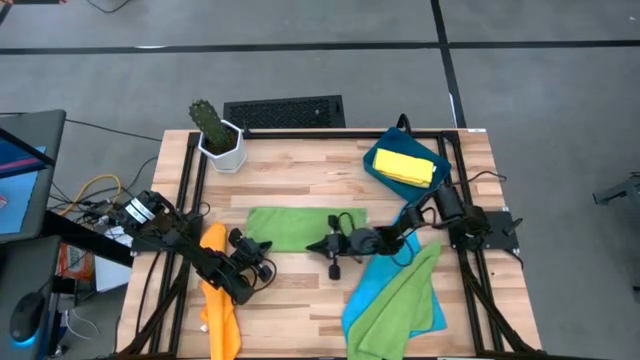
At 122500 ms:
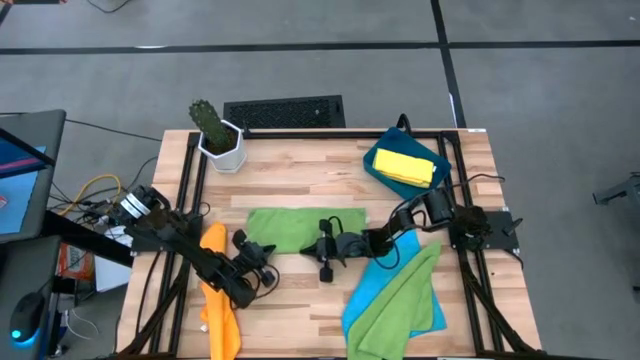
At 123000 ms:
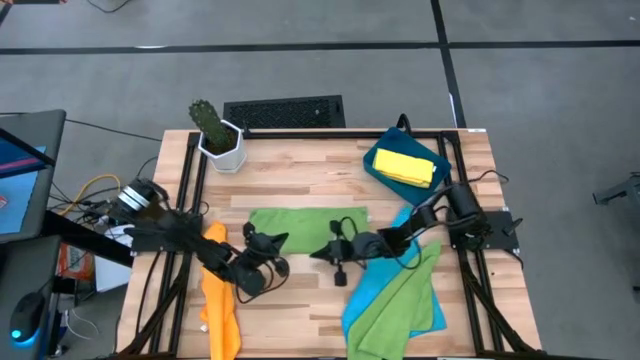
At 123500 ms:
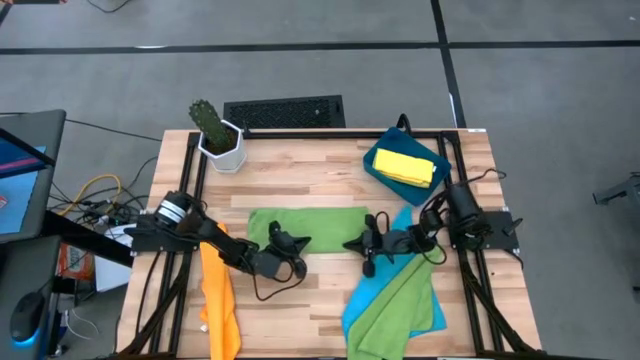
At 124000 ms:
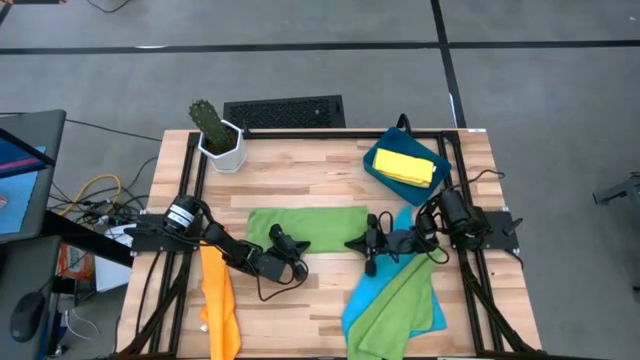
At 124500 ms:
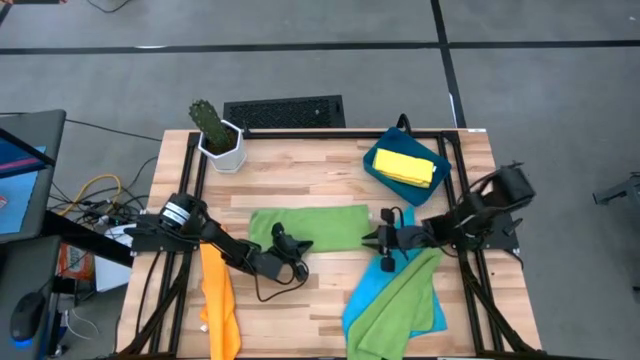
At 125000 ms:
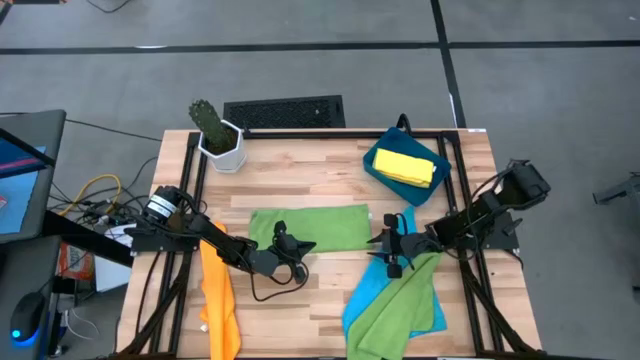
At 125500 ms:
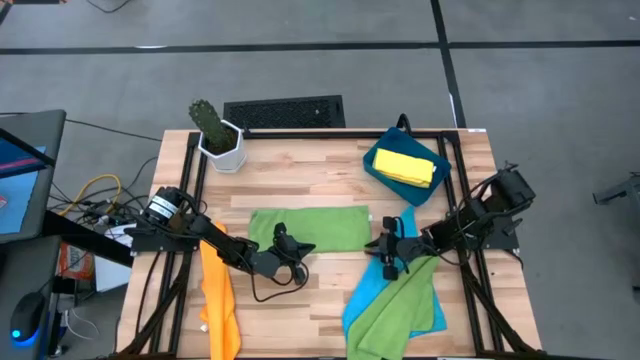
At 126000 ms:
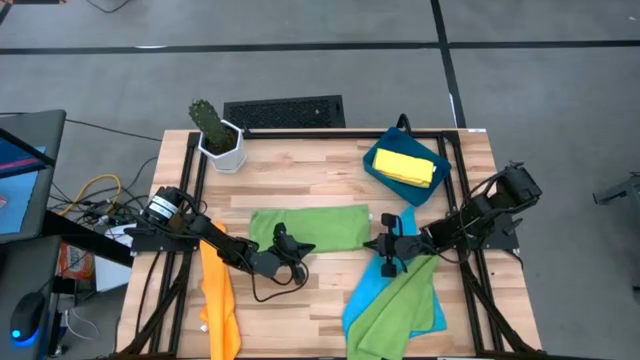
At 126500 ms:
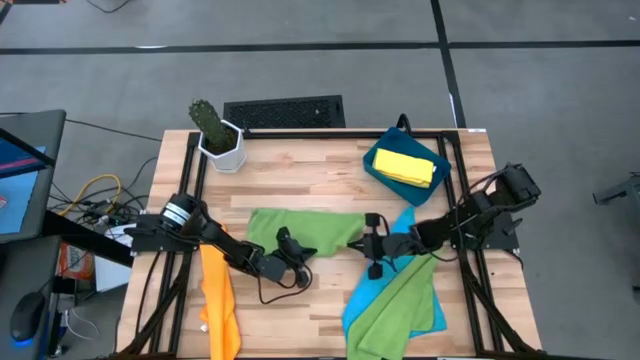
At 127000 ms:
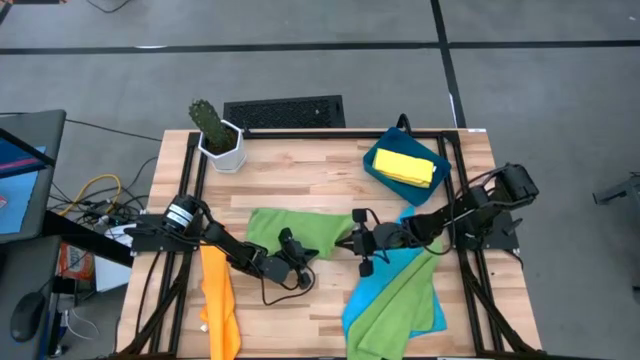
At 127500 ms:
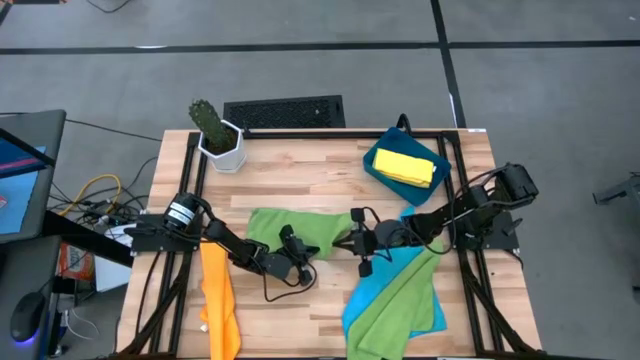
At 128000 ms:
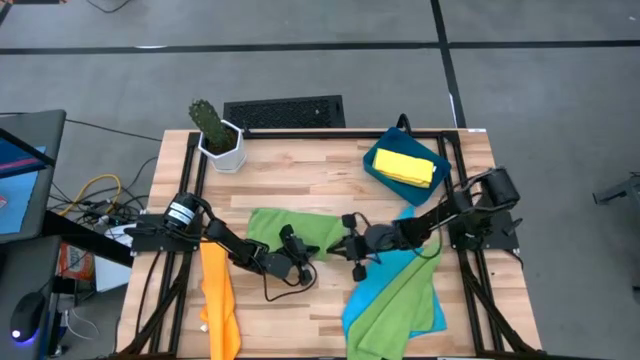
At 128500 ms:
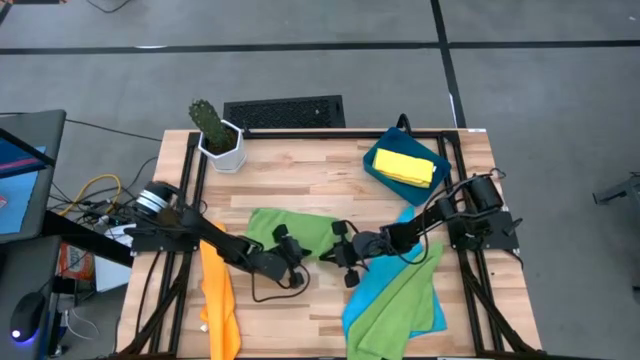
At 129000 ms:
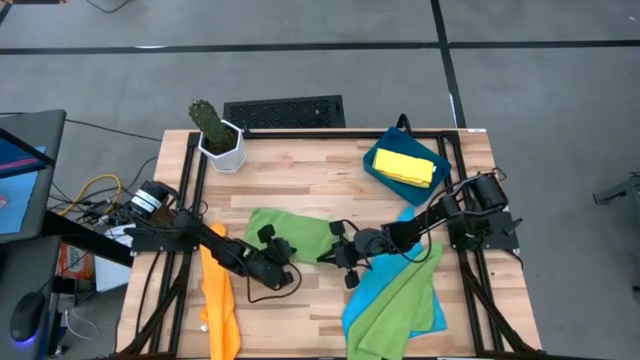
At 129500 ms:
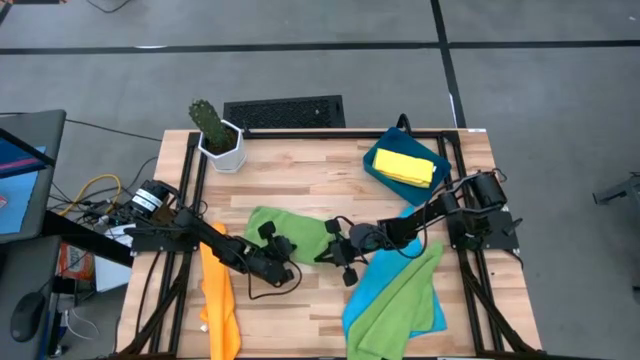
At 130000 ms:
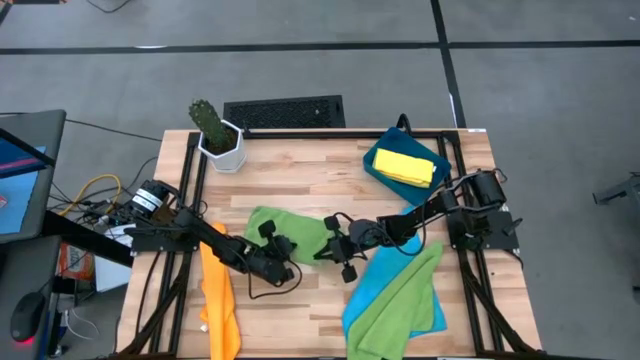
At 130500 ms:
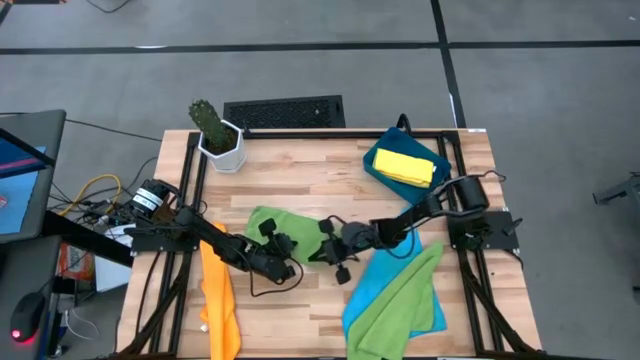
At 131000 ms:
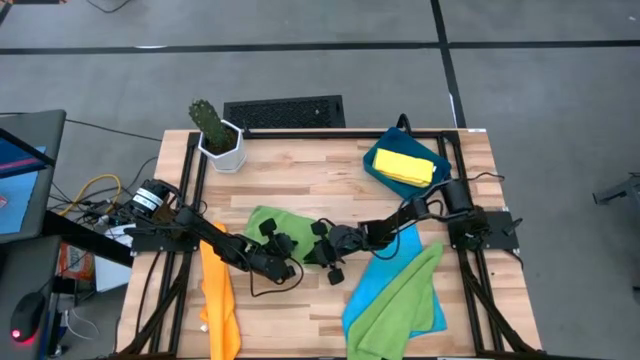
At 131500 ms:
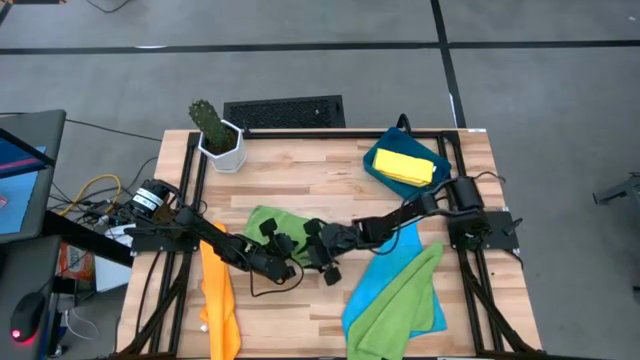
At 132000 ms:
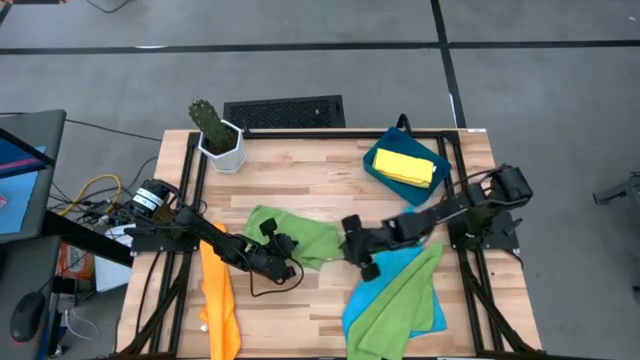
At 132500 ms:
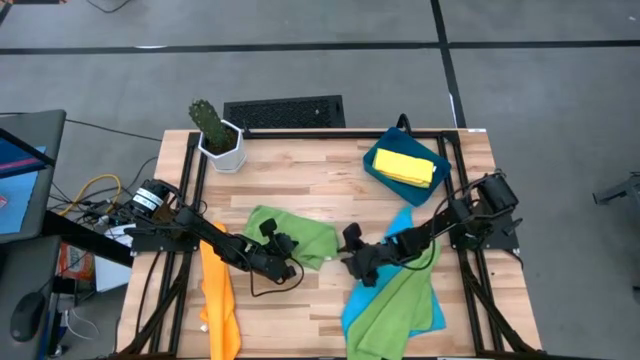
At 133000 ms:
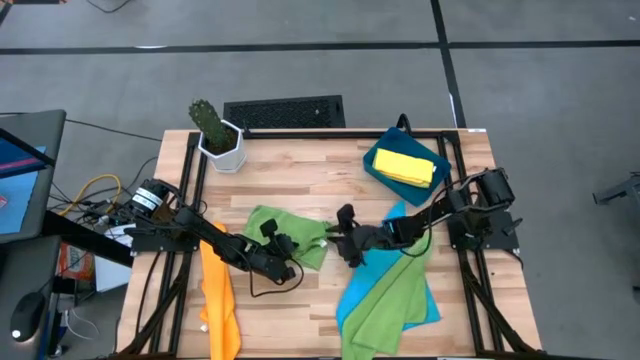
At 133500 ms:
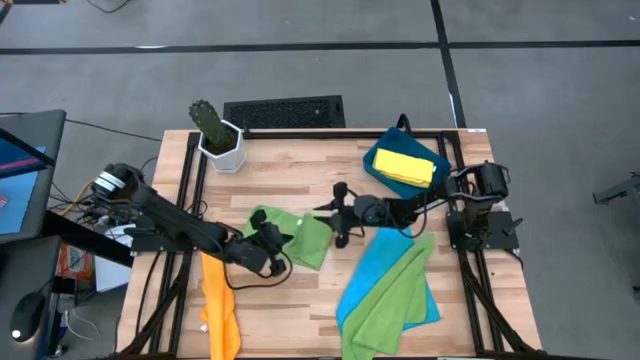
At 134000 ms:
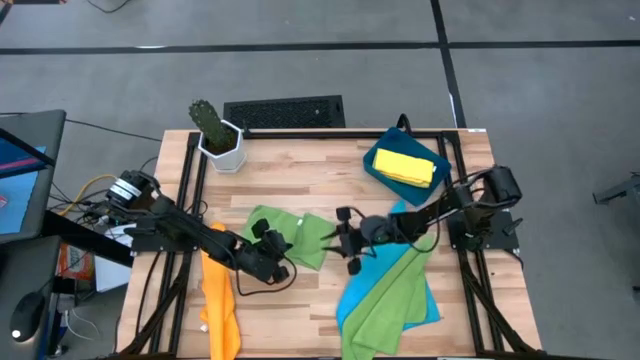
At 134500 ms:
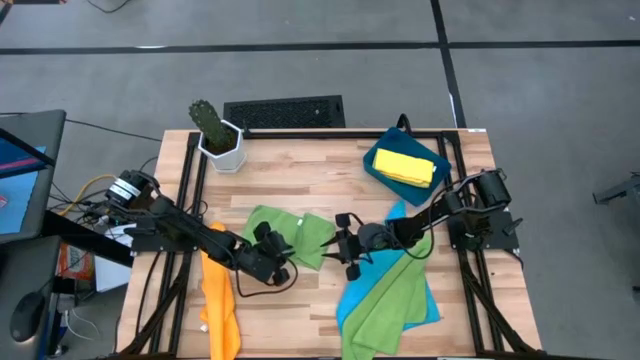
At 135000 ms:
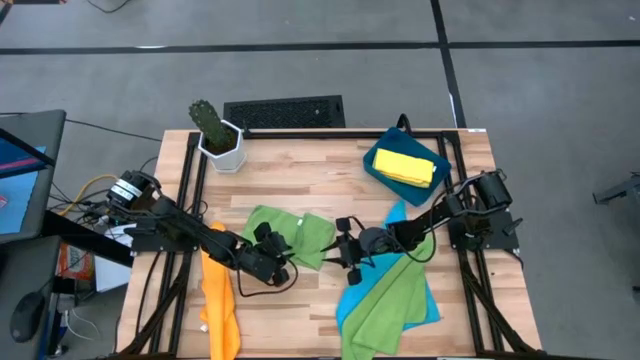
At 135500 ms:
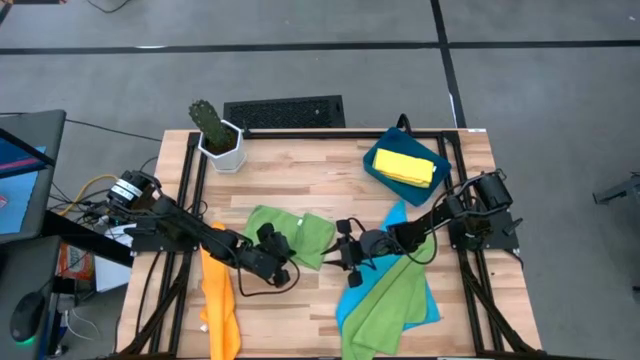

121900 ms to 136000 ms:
Task: Fold microfiber towels
Fold the left green microfiber cloth

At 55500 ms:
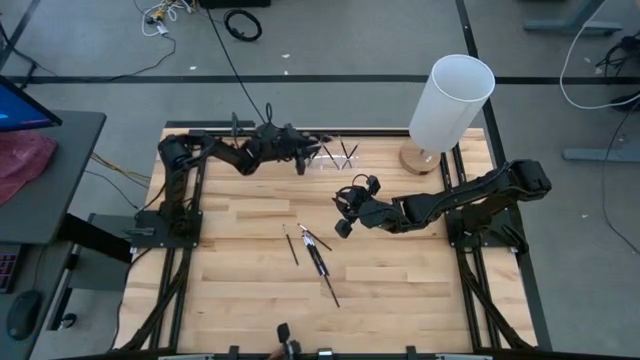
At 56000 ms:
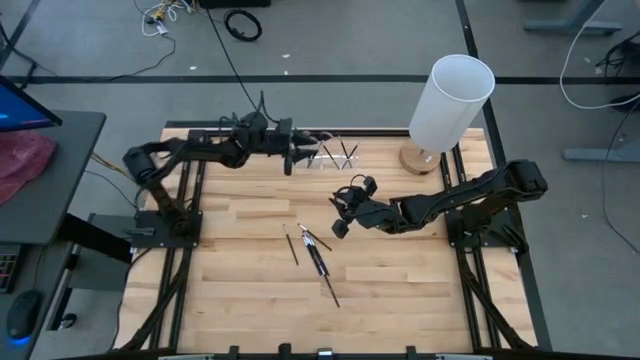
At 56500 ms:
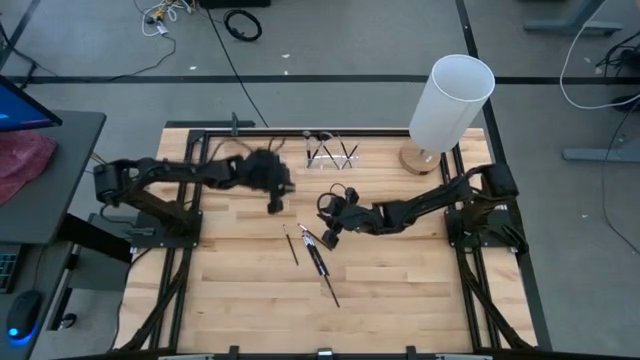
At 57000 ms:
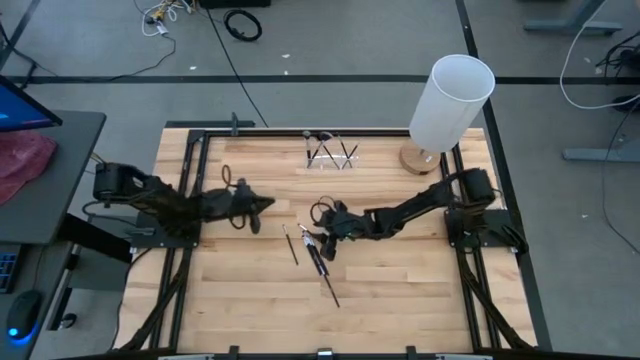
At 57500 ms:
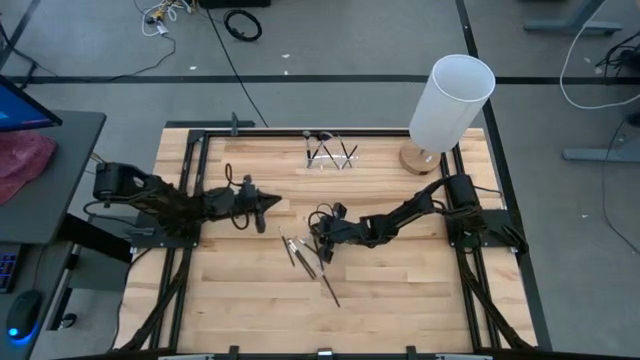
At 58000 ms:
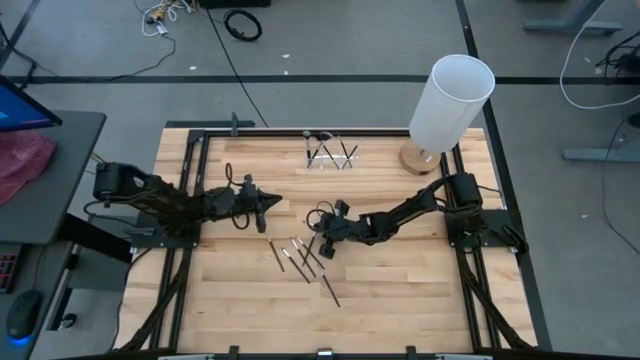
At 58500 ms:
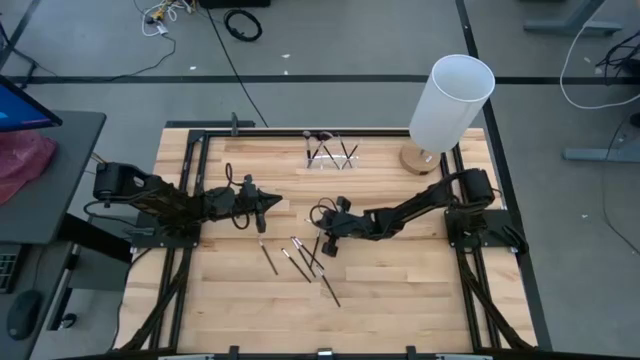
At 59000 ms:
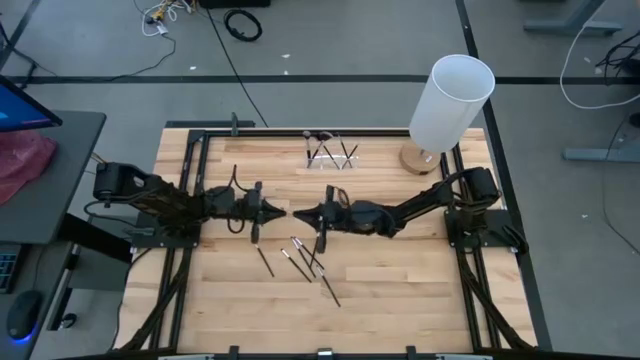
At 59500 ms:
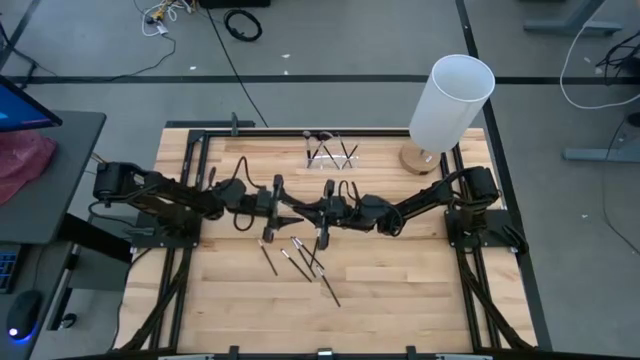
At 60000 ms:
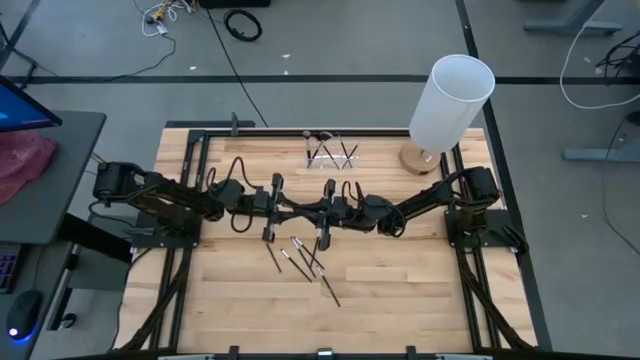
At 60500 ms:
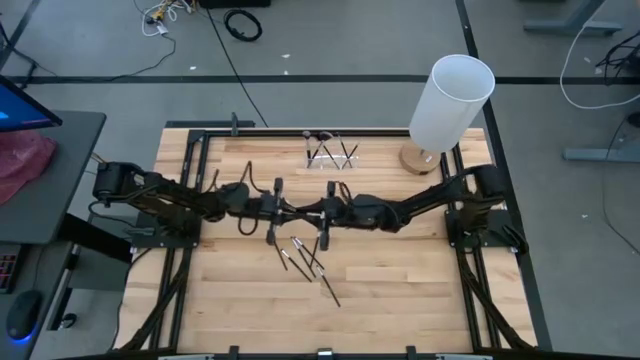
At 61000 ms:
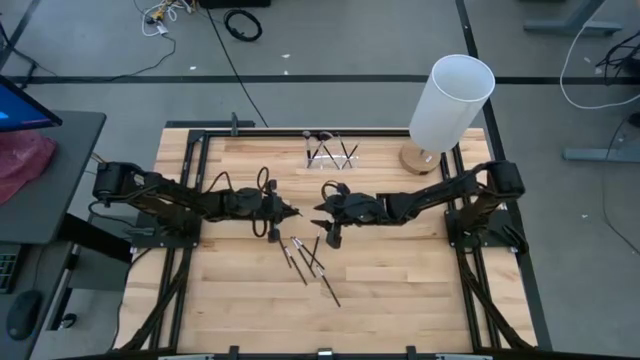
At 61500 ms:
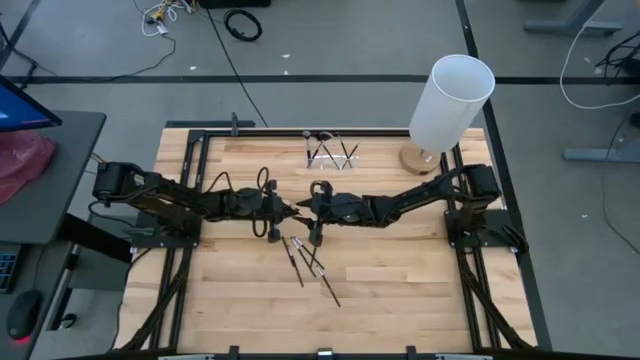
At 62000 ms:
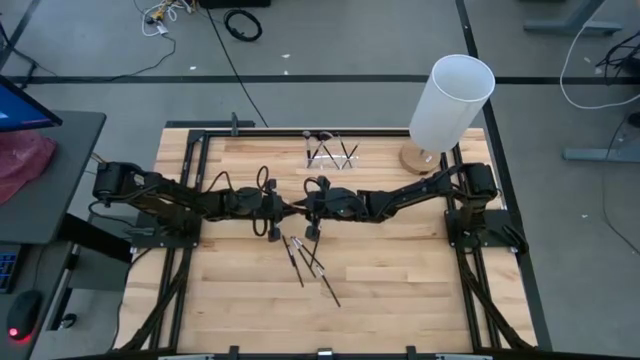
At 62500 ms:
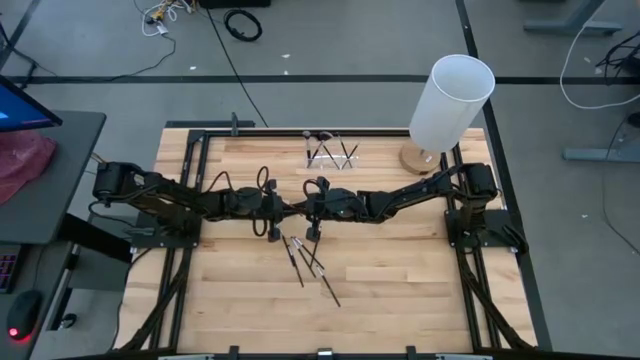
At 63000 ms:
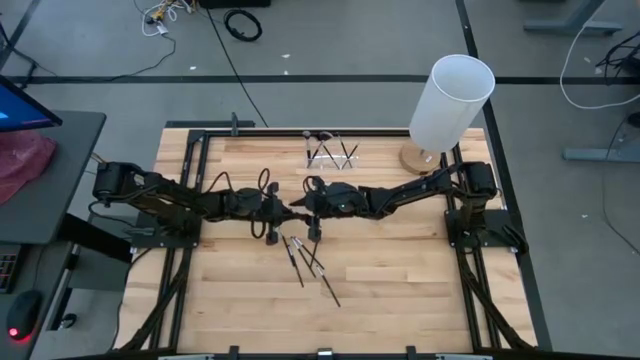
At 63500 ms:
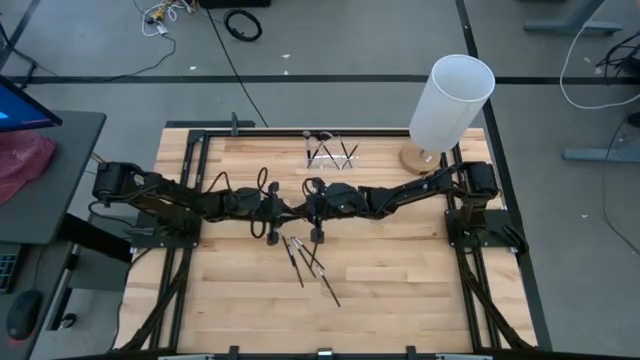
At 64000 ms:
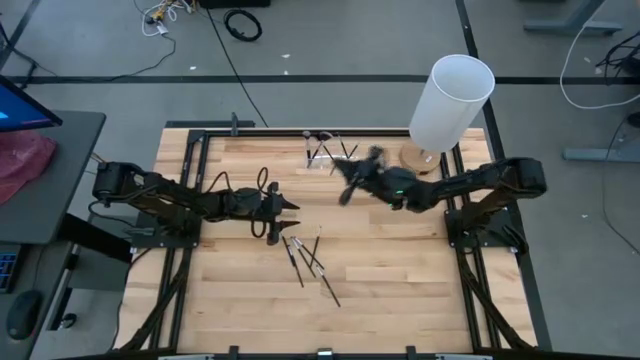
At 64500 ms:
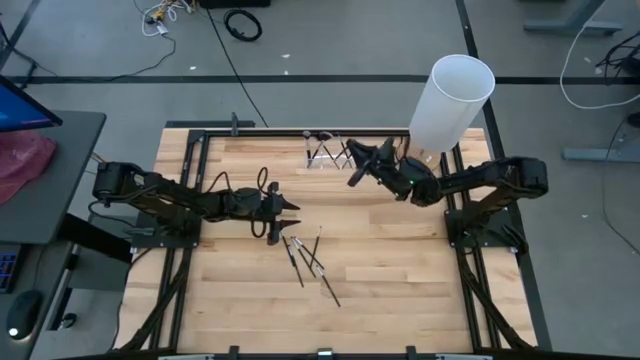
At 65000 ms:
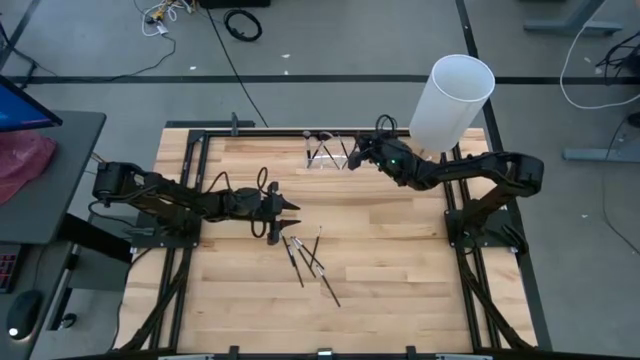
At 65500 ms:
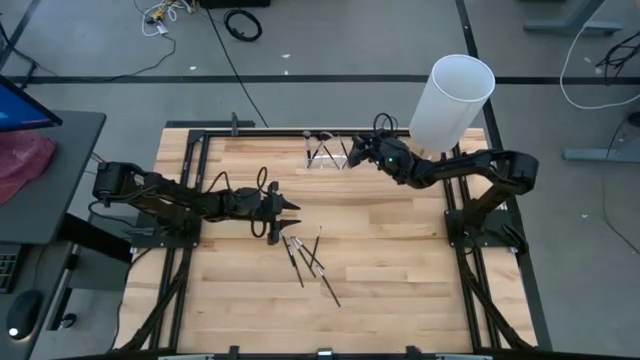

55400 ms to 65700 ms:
Task: Pick & Place Makeup Supplies
Put the black makeup brush into the transparent organizer
